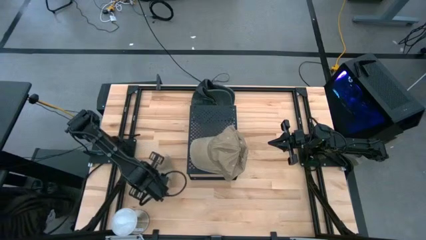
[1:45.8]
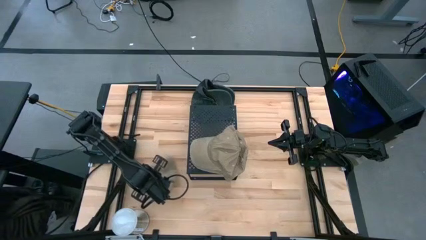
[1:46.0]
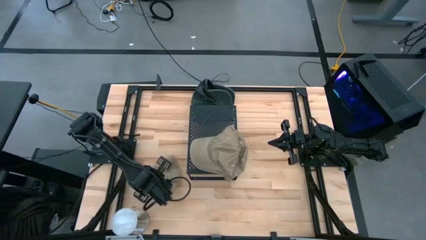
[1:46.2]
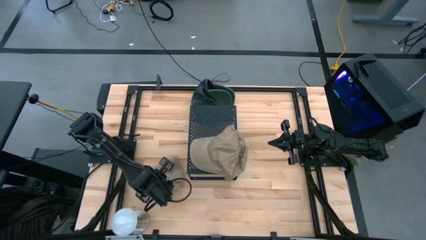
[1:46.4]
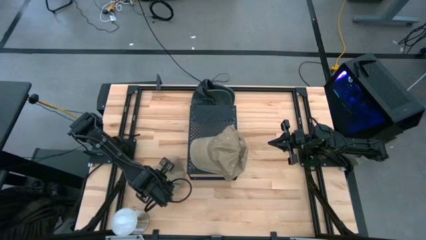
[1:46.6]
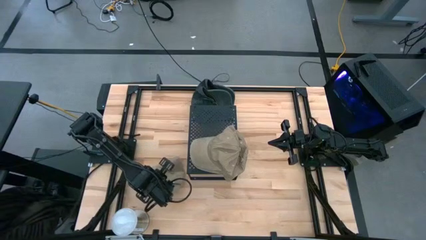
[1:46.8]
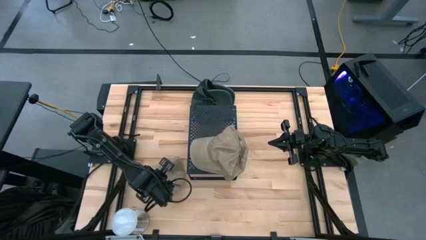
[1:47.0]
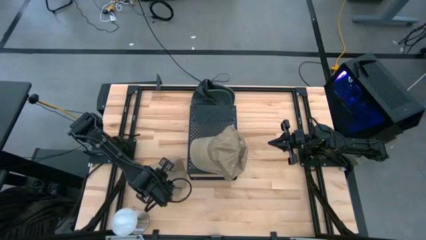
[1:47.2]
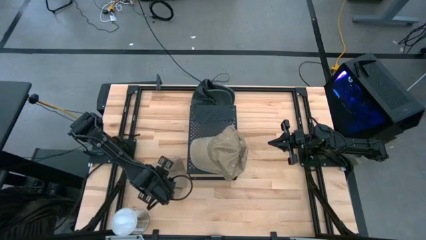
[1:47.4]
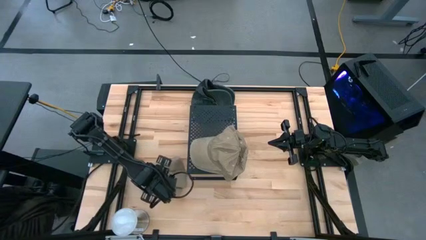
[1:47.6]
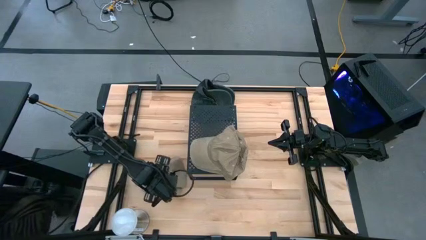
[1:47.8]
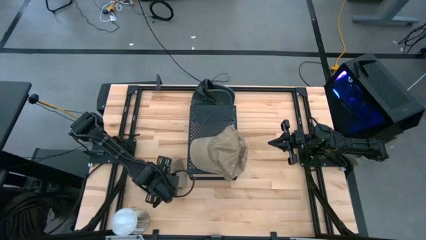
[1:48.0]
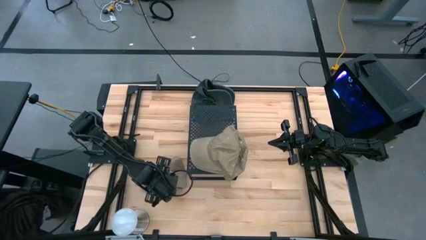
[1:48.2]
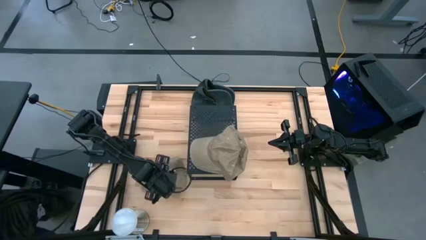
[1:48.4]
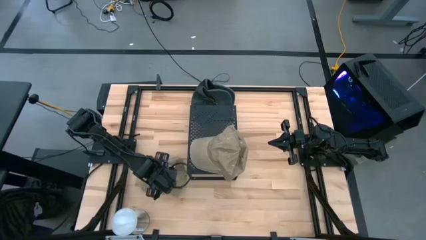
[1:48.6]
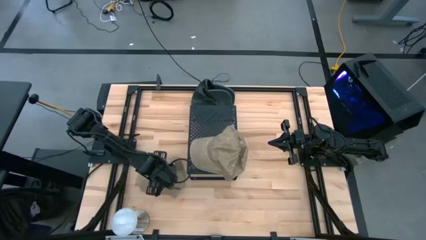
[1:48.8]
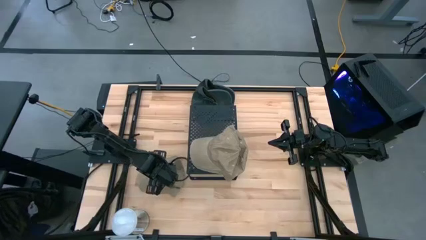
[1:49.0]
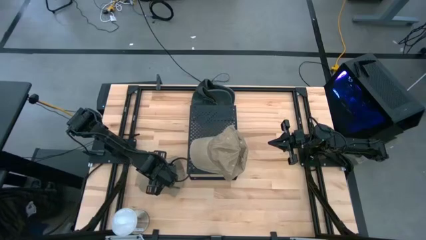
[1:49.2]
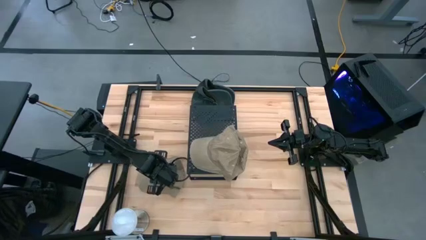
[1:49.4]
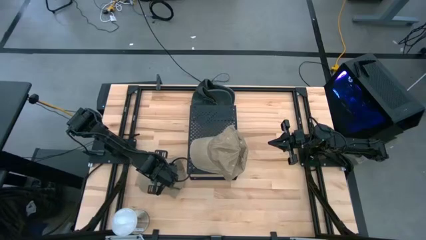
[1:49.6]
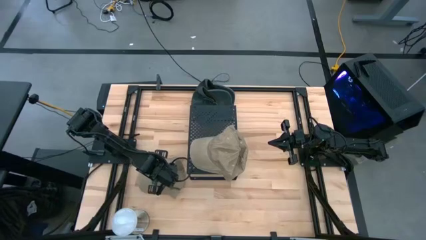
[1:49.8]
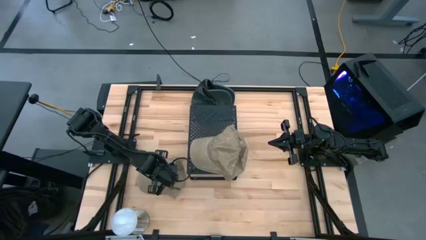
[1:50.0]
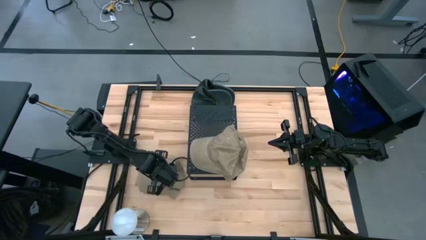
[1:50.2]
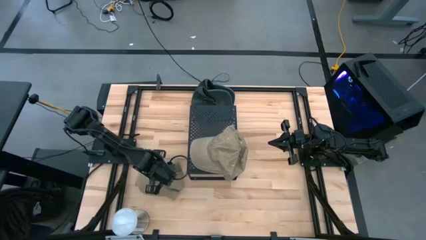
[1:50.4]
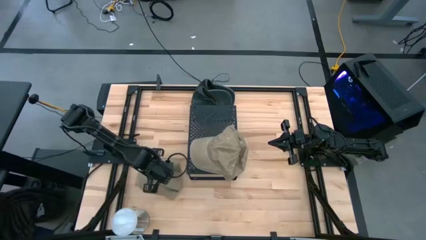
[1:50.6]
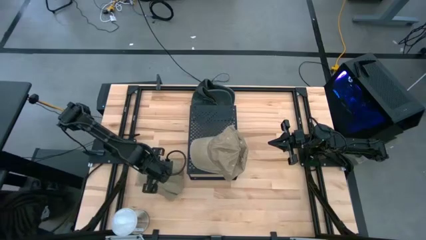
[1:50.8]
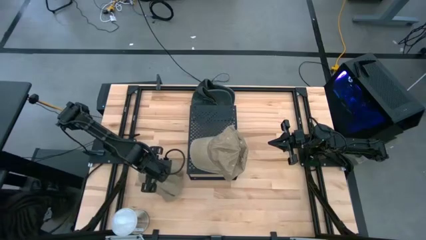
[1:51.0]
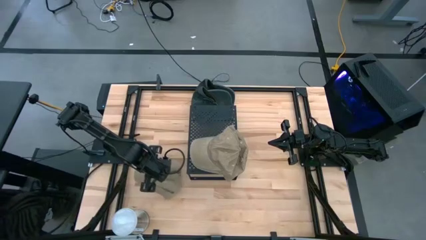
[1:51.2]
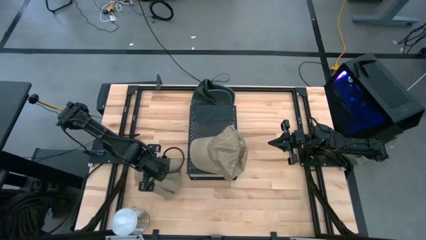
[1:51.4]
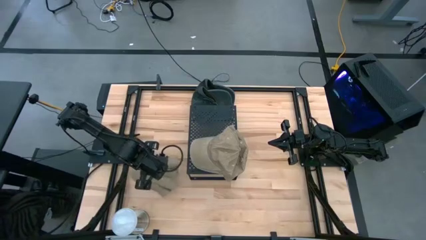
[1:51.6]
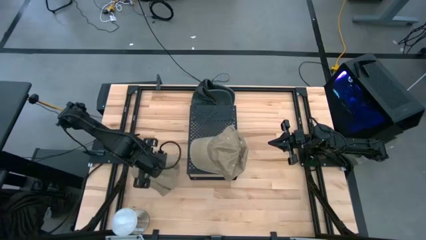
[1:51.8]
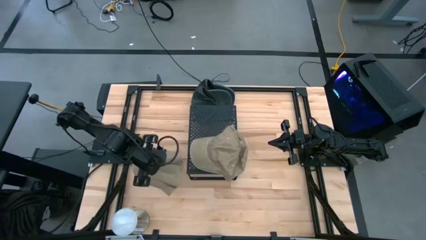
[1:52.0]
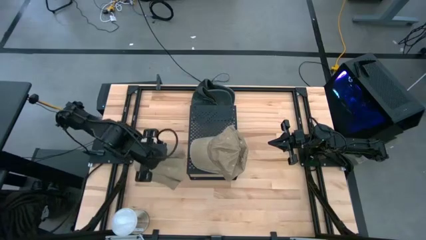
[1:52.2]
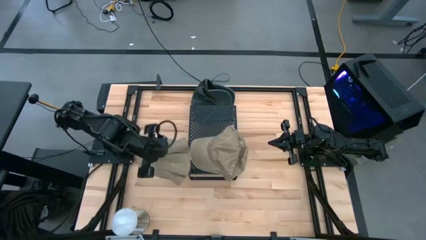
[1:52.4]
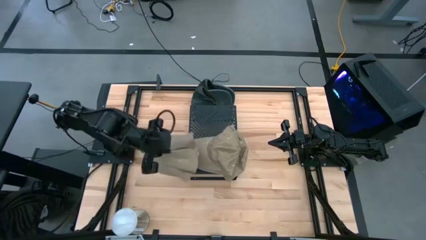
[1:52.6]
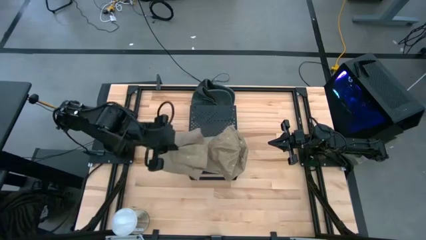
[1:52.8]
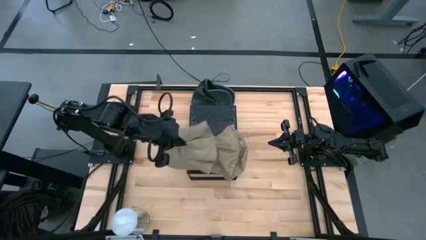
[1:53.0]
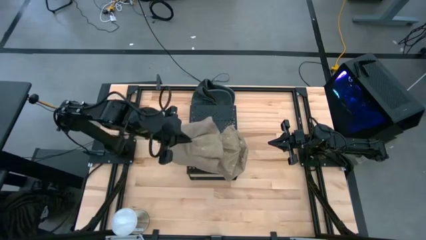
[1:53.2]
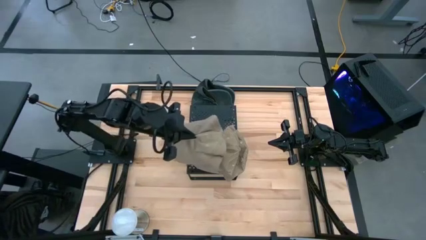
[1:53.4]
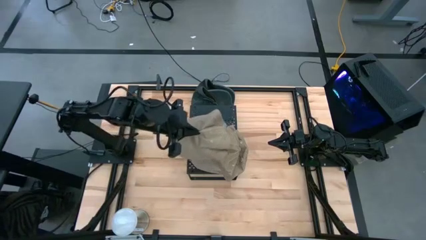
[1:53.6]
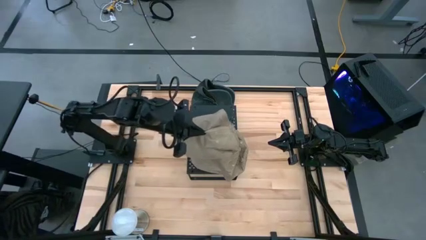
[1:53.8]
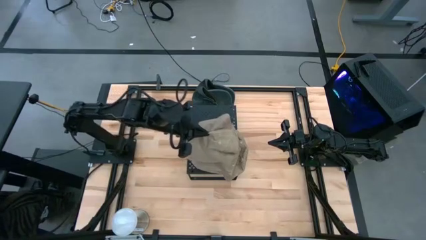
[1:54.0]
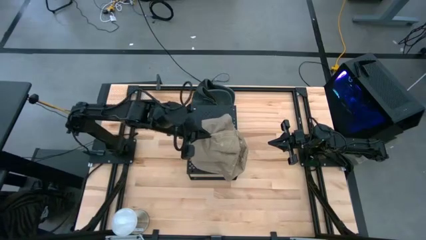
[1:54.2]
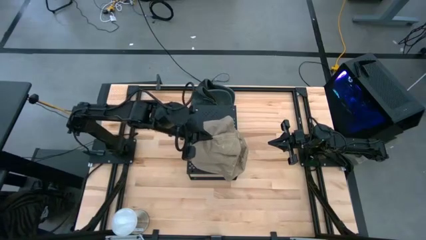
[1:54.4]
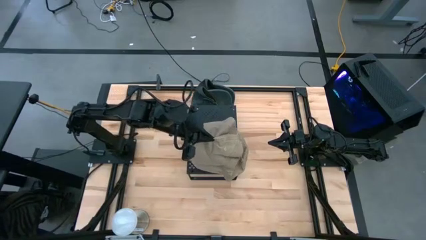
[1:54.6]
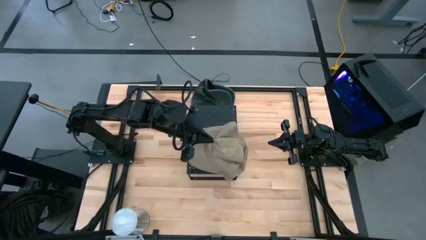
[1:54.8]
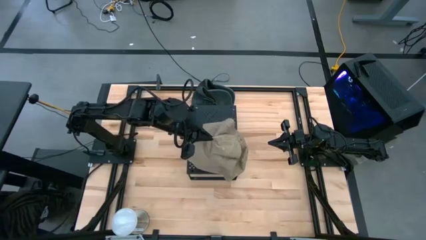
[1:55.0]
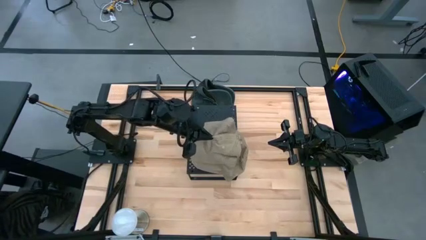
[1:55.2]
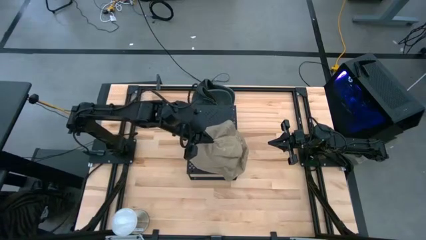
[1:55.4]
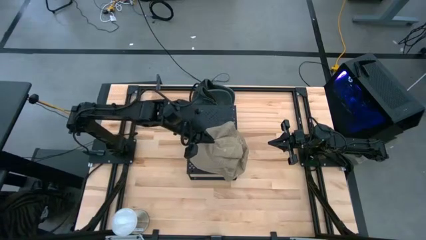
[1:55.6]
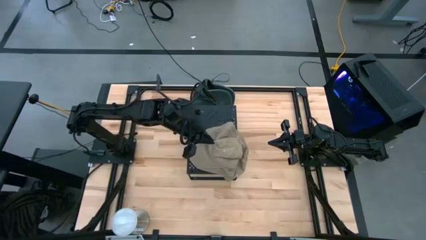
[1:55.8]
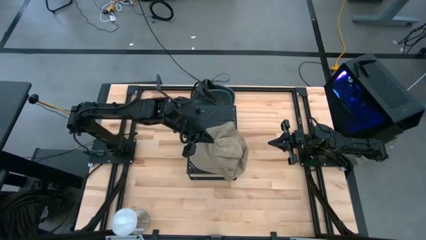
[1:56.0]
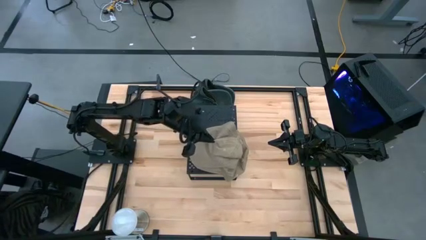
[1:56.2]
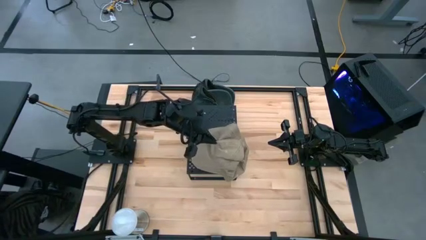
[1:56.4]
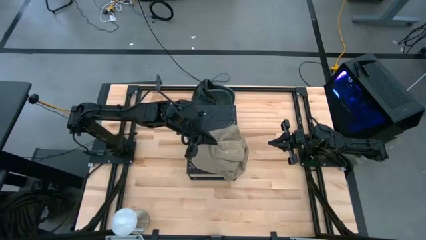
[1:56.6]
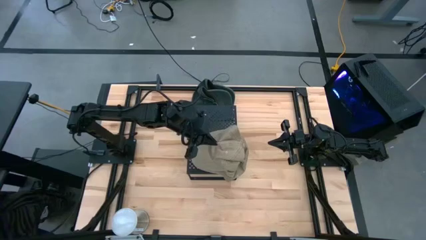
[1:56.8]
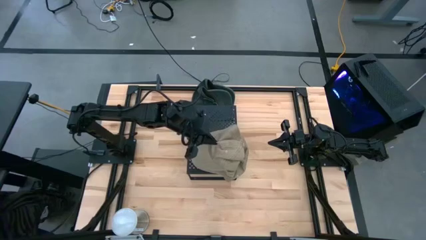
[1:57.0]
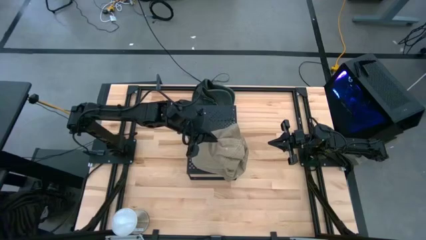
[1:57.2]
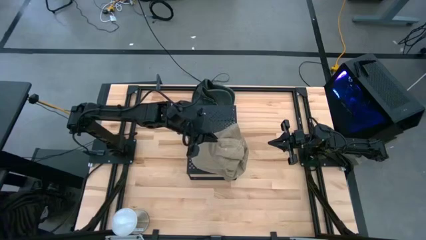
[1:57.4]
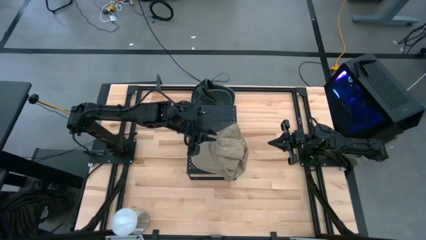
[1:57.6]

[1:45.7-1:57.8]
Task: Pick & Place hat
Stack the brown cap on top of the other brown cap on the shelf
